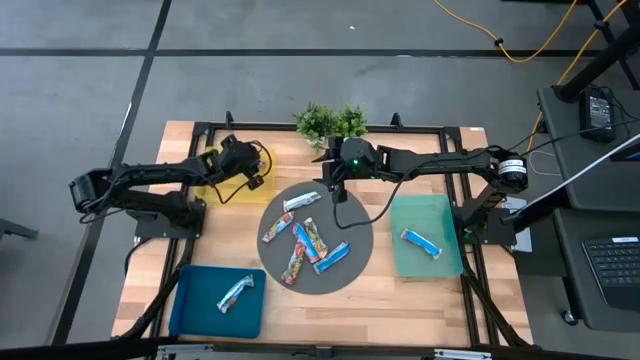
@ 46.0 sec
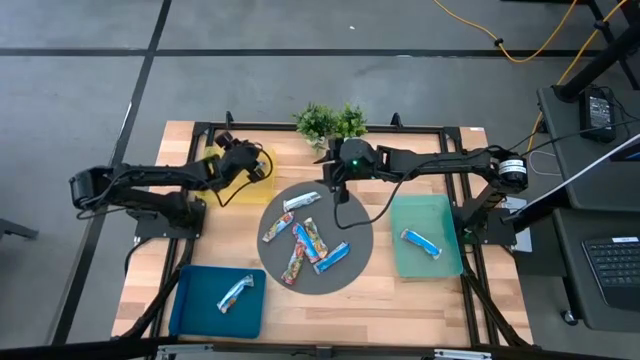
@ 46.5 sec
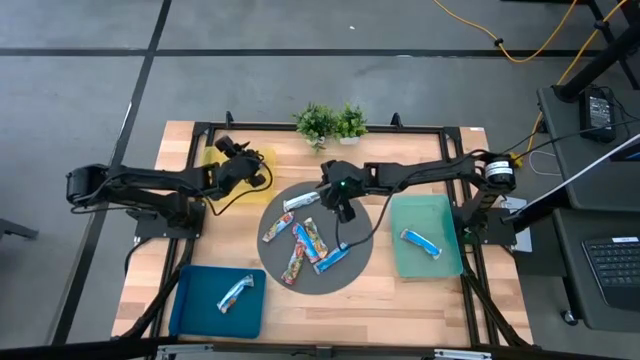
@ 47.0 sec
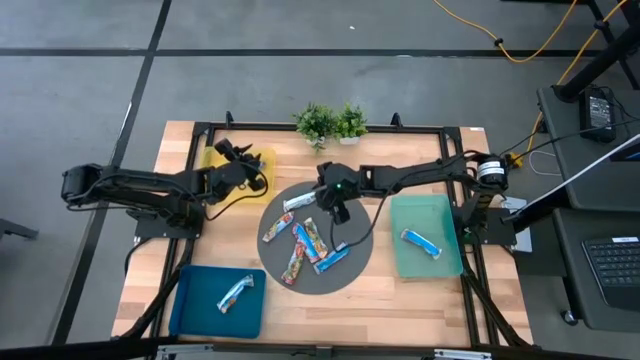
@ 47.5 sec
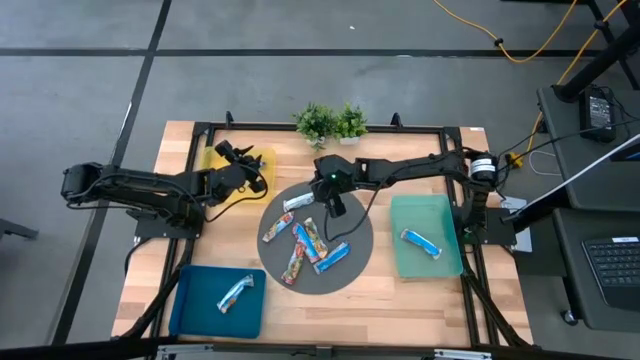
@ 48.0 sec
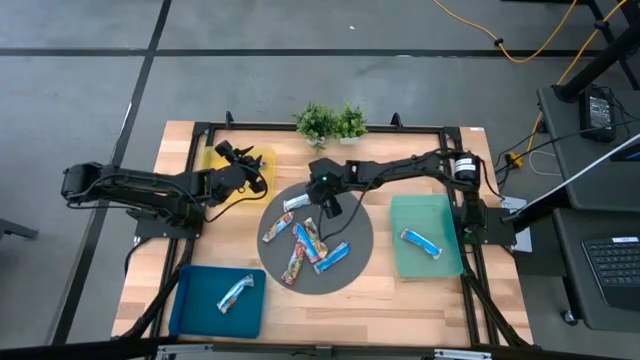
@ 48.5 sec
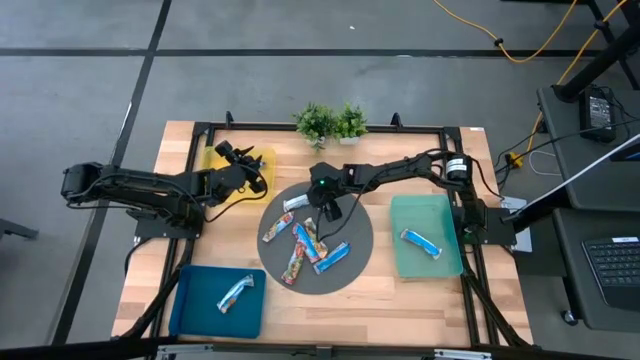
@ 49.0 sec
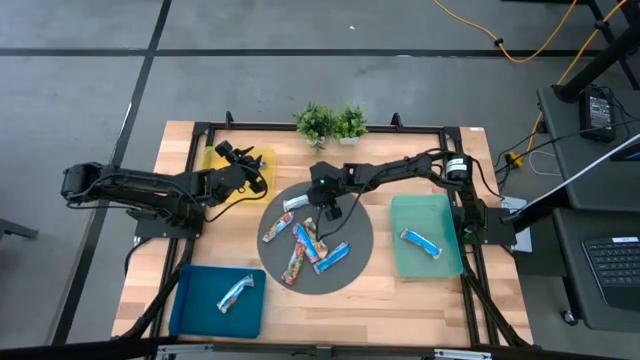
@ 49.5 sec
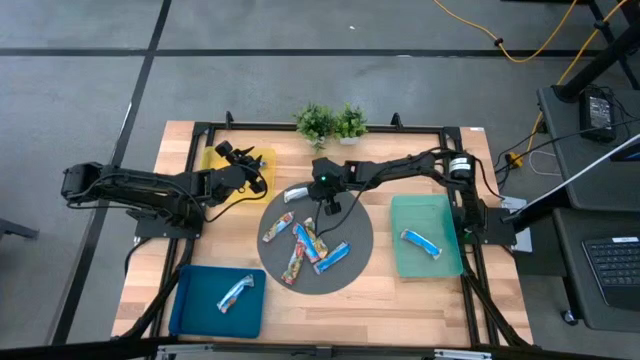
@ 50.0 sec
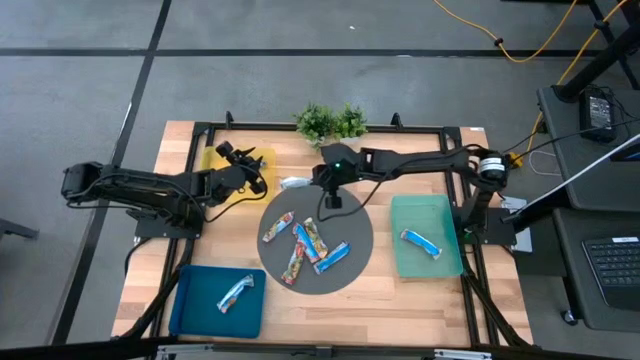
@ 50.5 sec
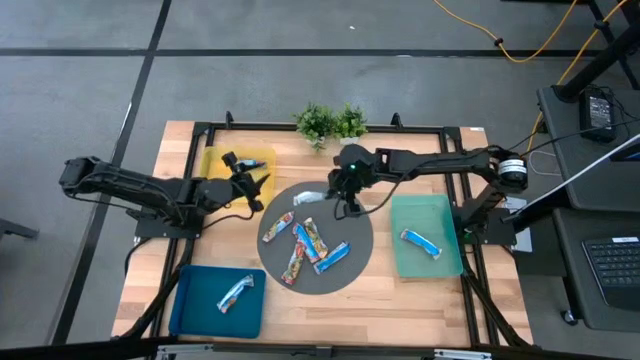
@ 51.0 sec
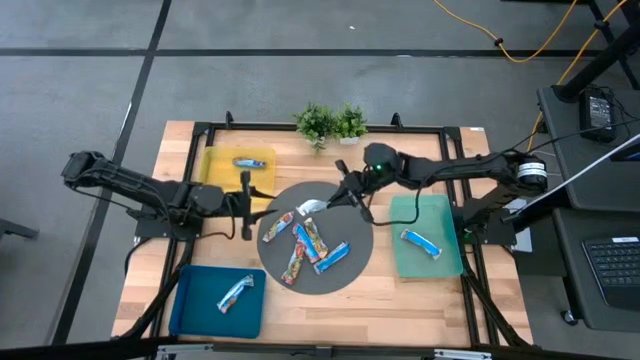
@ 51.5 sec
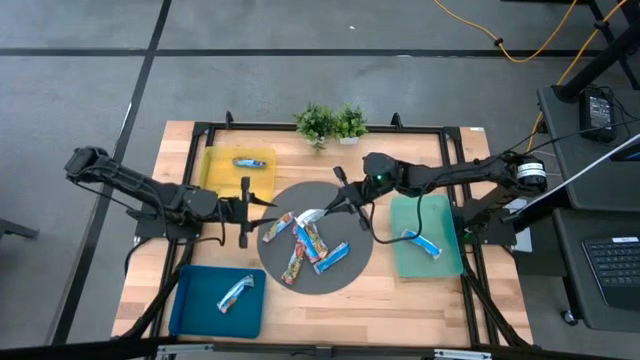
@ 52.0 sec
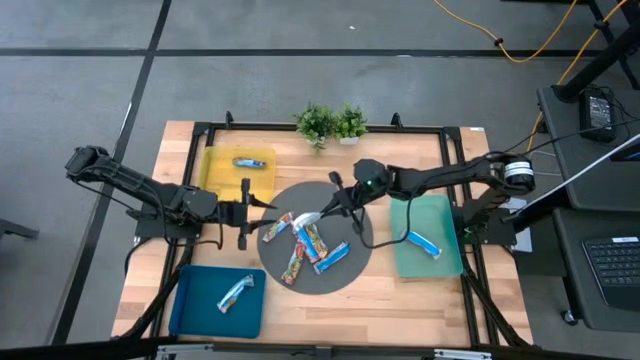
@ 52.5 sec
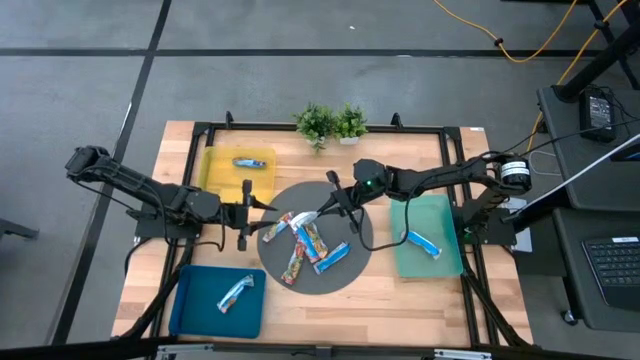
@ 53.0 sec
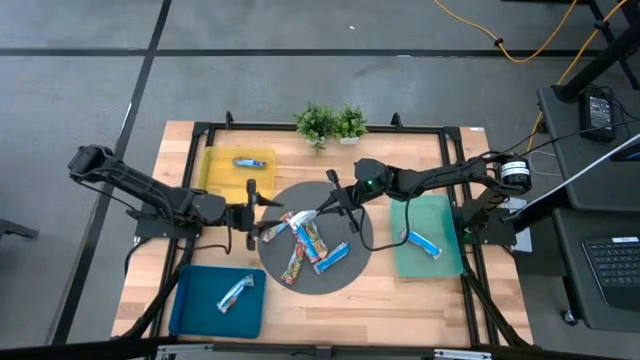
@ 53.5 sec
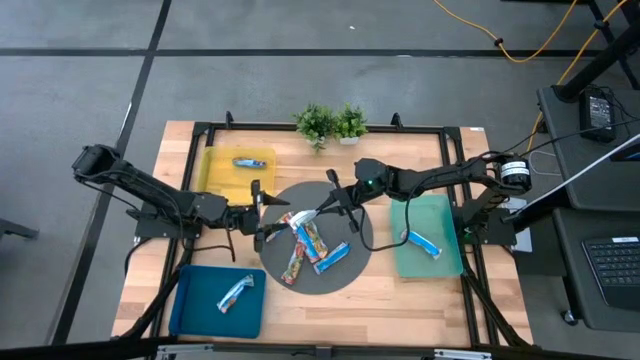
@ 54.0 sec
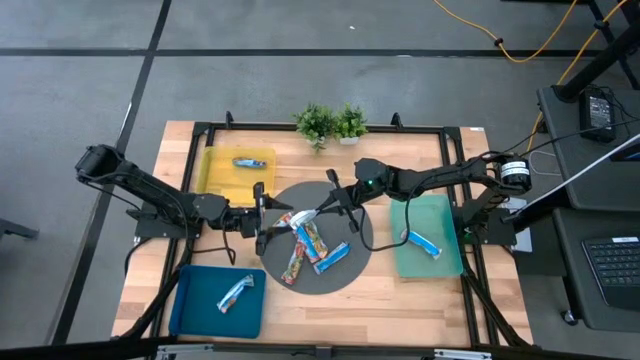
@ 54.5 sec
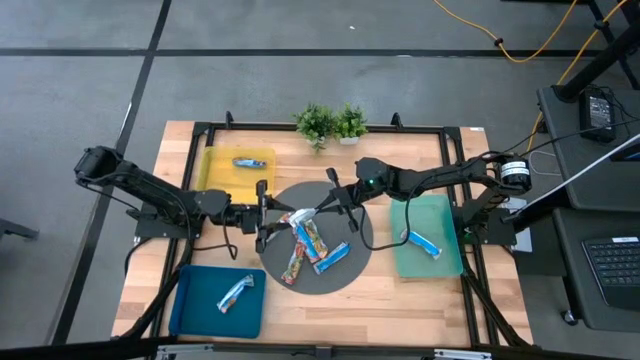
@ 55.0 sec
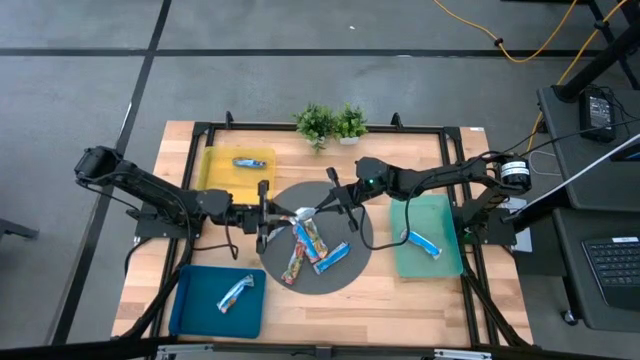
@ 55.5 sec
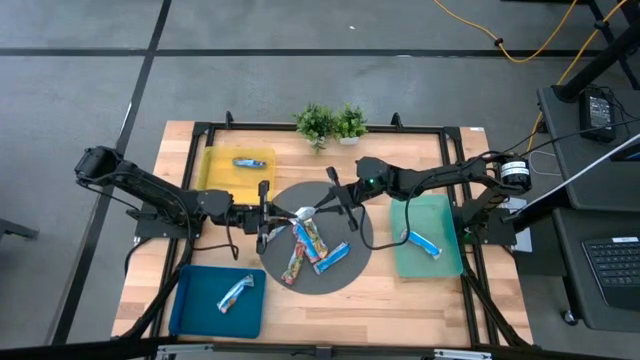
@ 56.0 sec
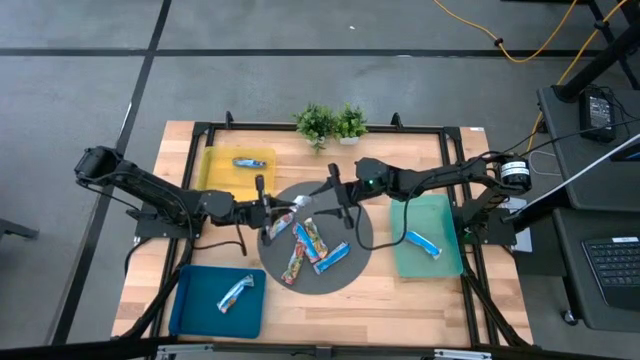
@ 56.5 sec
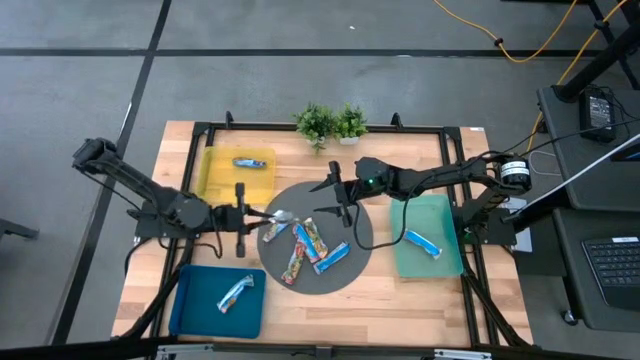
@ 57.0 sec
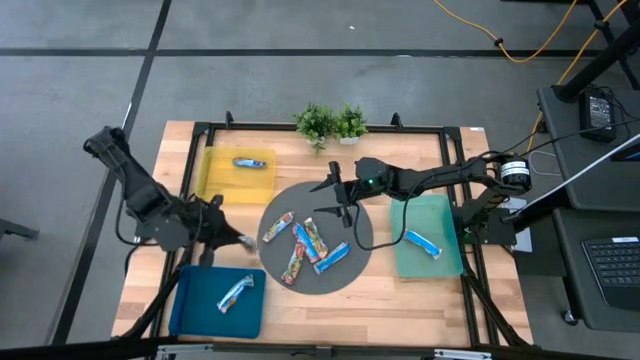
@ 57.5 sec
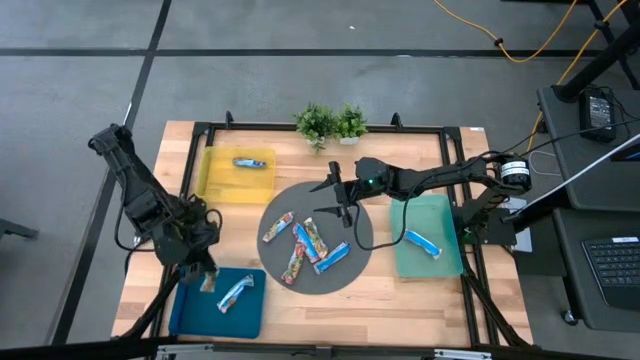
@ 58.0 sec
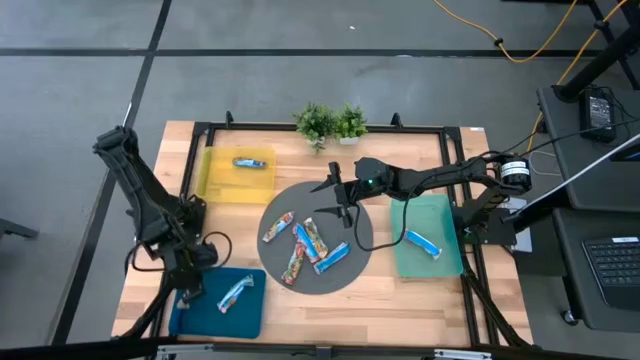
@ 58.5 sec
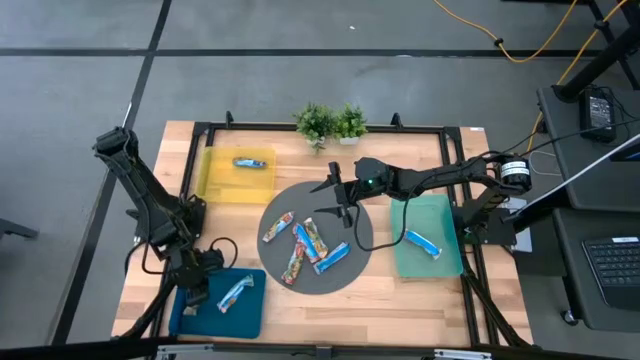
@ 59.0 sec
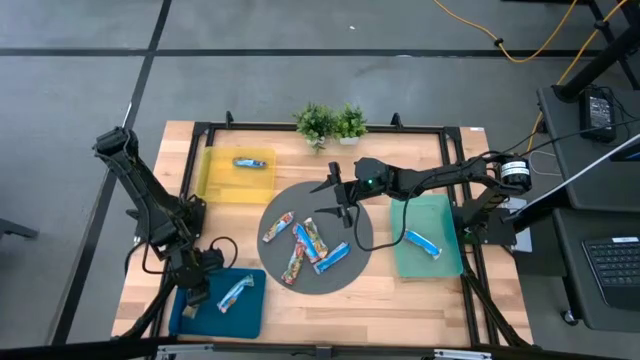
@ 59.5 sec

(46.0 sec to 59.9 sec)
Task: Pick and place Granola Bars by type
Put the yellow granola bar into the blue bin

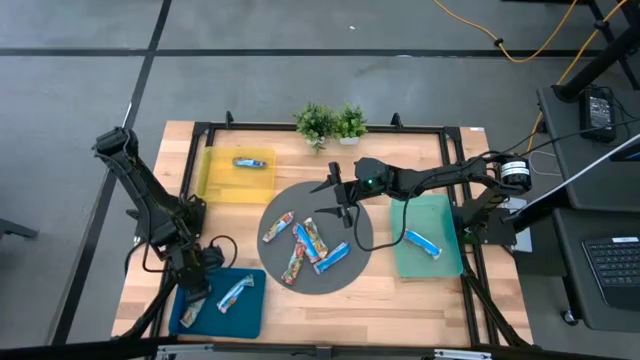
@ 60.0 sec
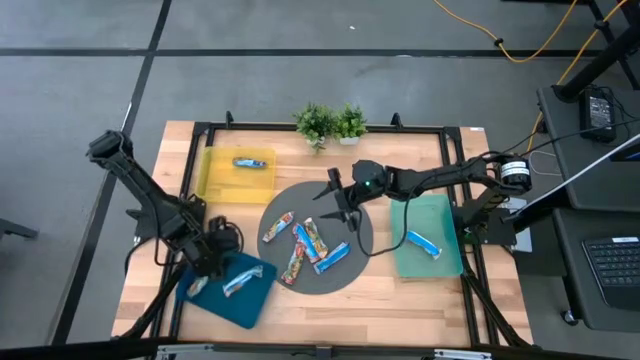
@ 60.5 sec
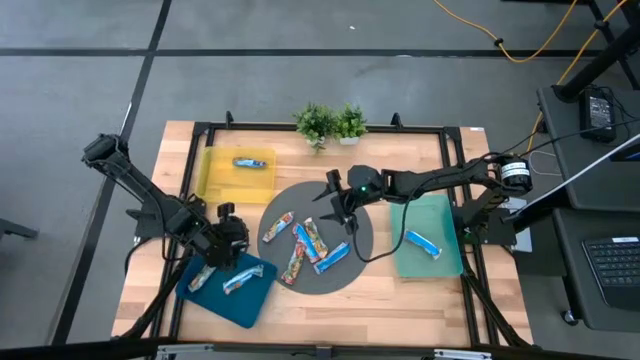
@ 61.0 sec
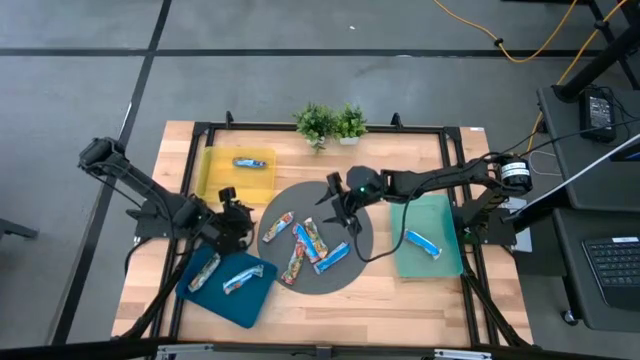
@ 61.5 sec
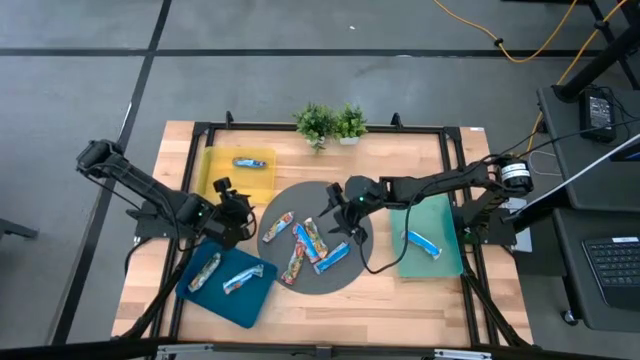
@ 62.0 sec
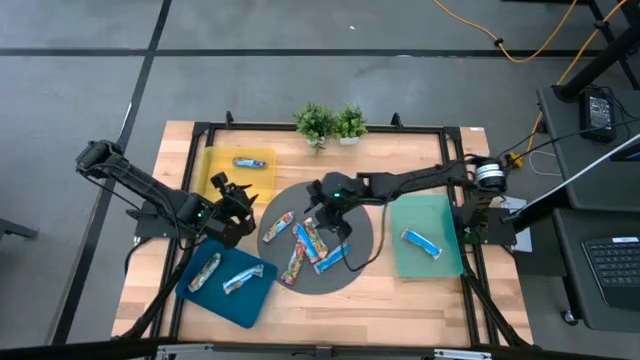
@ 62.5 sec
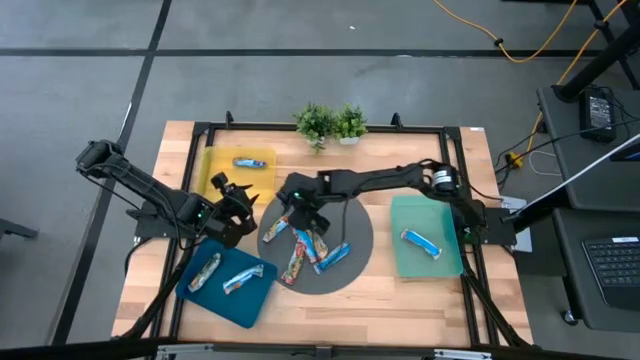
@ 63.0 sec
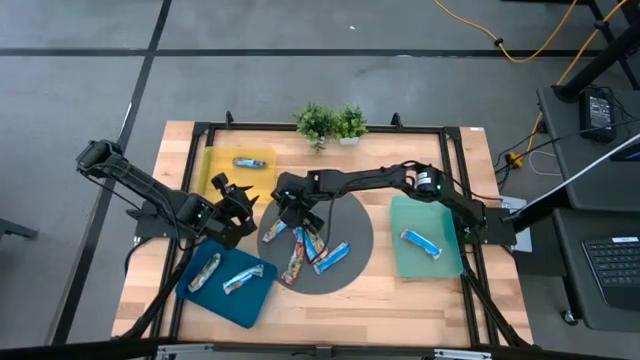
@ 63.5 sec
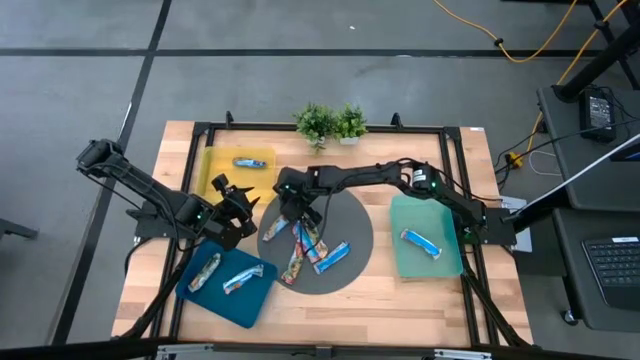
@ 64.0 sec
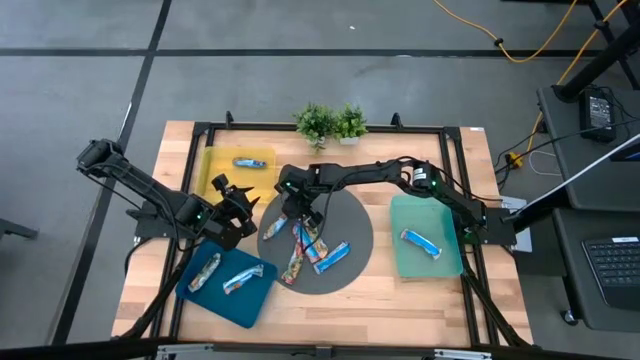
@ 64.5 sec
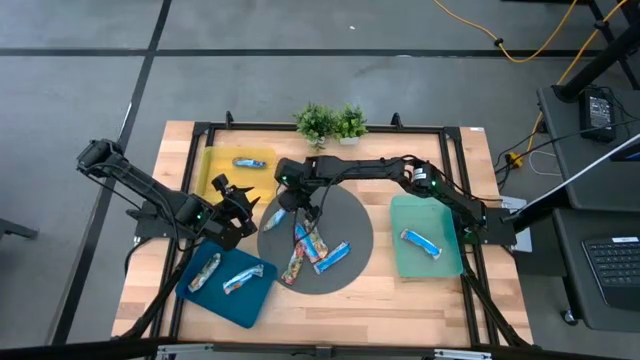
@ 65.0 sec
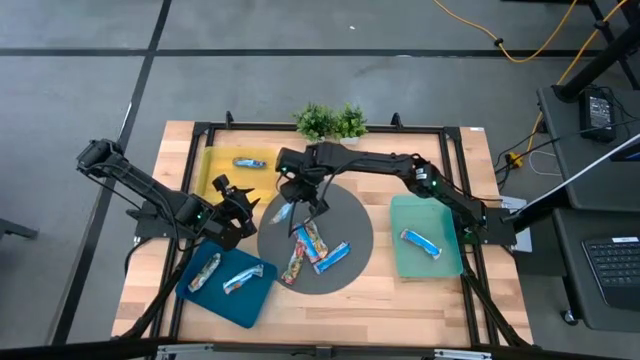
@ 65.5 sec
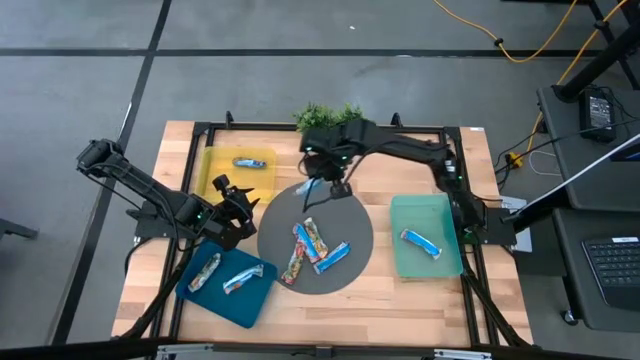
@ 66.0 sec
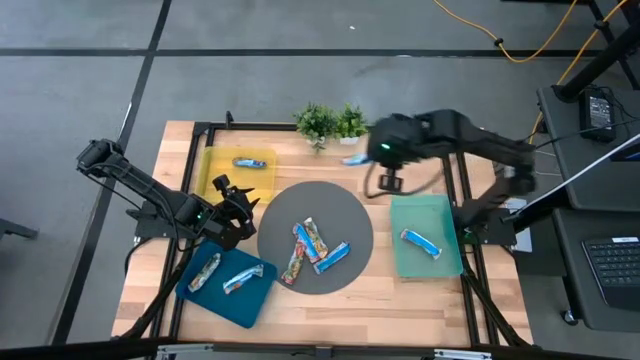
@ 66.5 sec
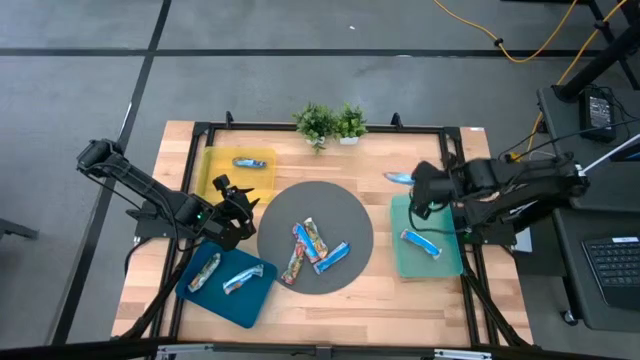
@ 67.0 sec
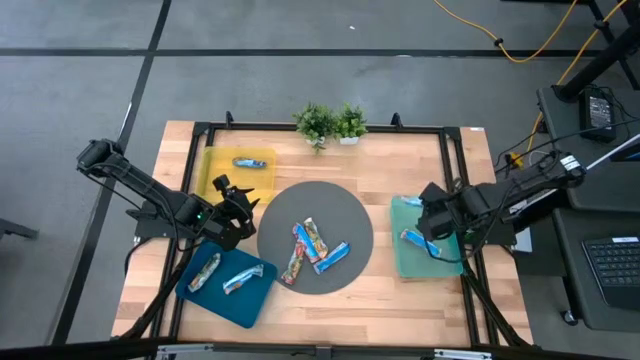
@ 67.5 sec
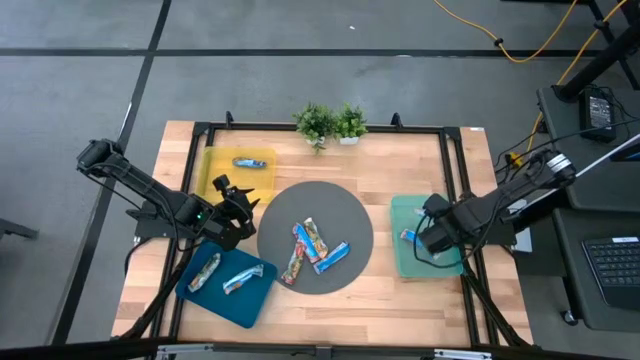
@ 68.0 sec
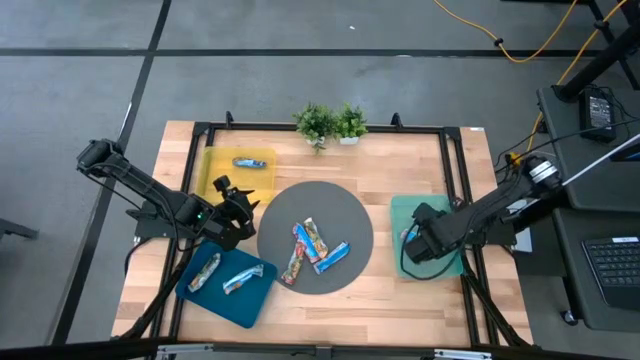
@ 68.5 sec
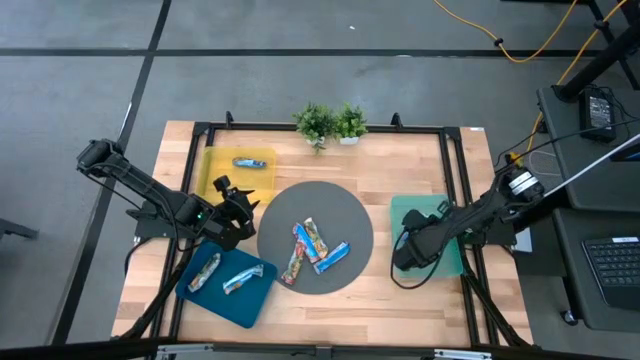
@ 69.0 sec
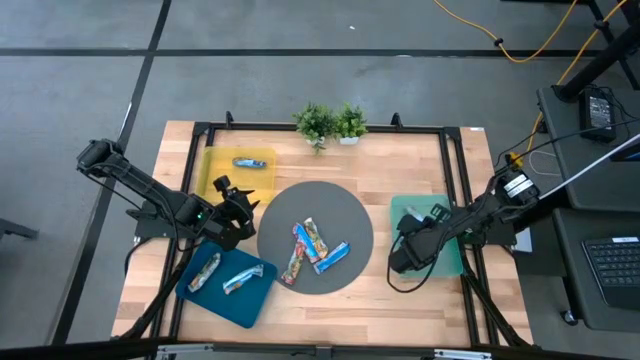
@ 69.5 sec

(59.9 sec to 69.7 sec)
Put the red granola bar into the green bin
